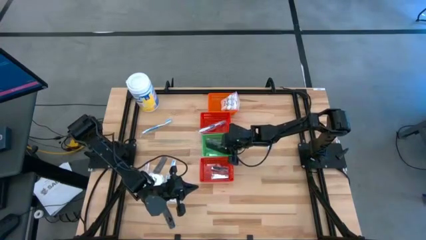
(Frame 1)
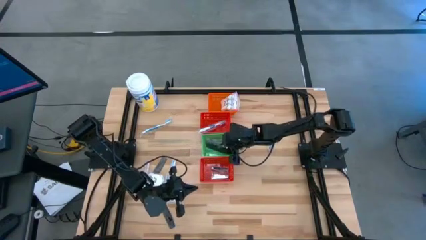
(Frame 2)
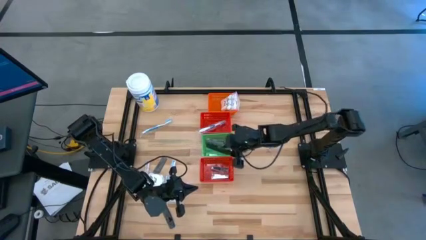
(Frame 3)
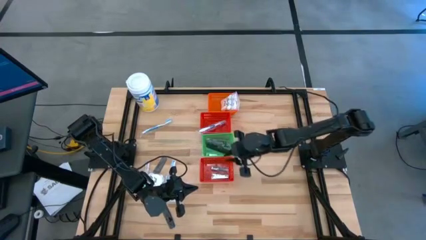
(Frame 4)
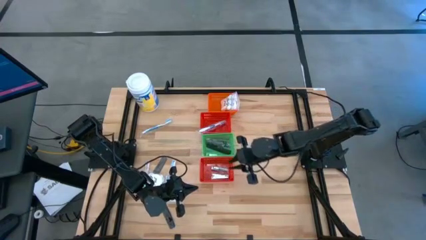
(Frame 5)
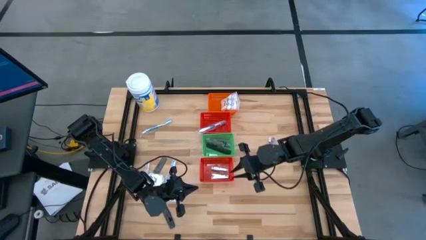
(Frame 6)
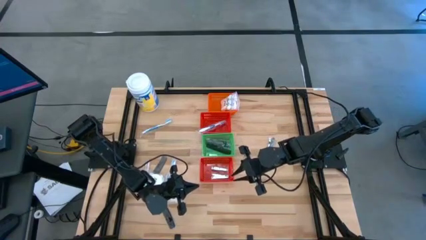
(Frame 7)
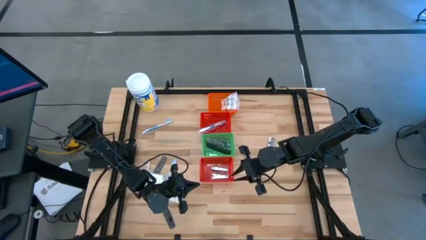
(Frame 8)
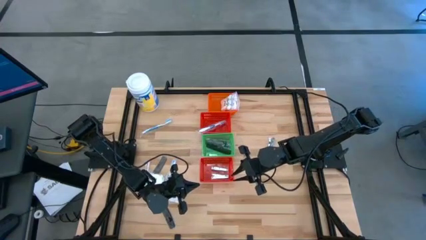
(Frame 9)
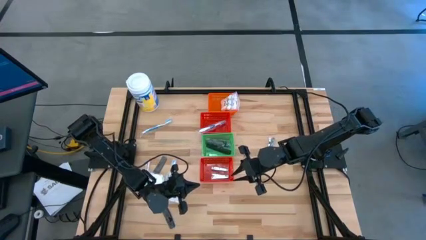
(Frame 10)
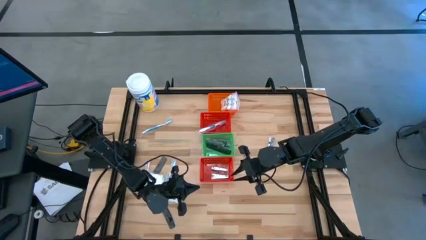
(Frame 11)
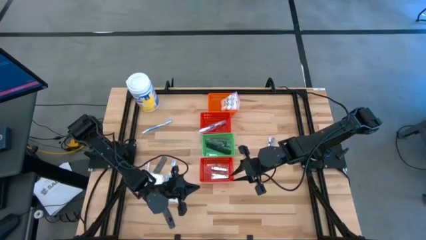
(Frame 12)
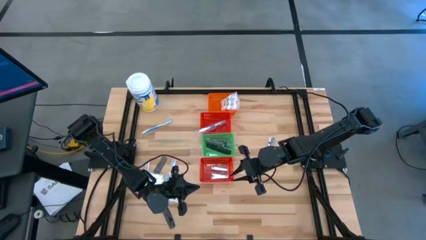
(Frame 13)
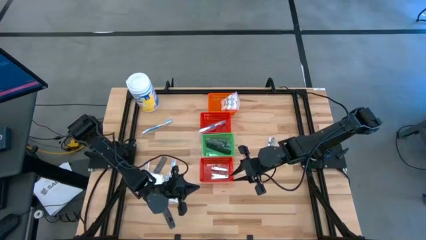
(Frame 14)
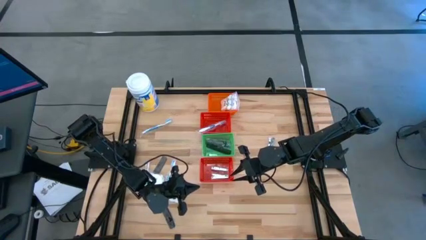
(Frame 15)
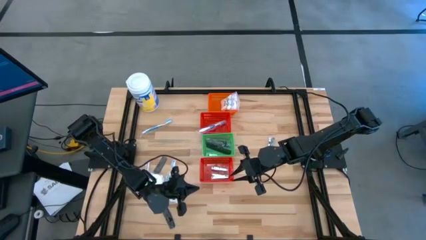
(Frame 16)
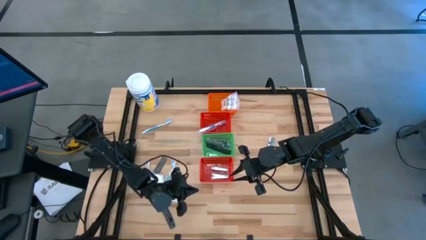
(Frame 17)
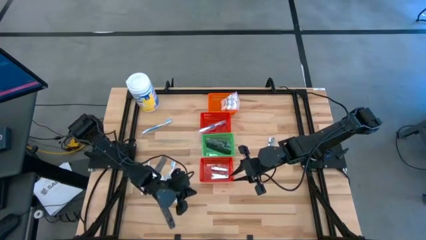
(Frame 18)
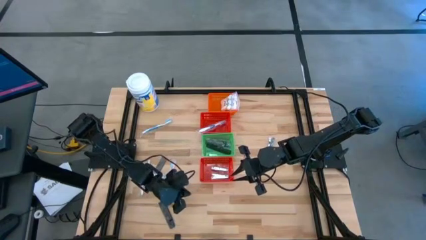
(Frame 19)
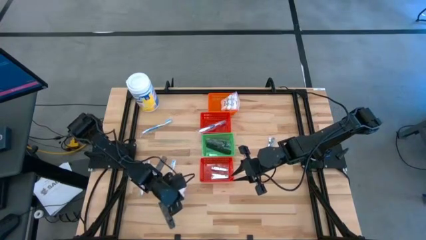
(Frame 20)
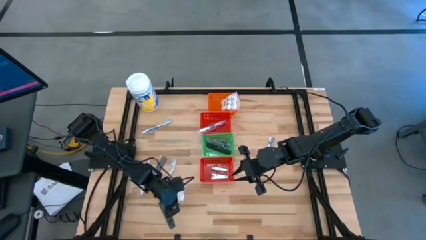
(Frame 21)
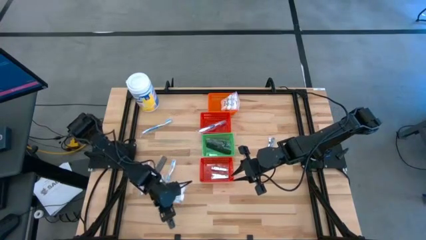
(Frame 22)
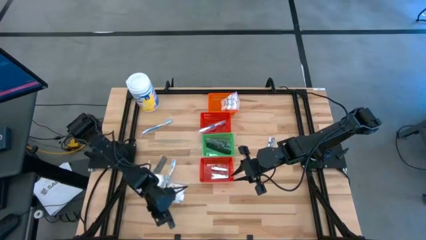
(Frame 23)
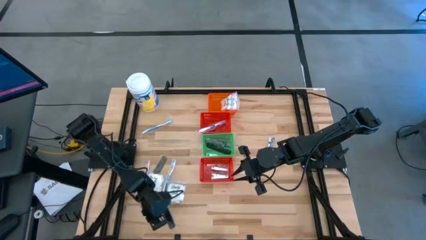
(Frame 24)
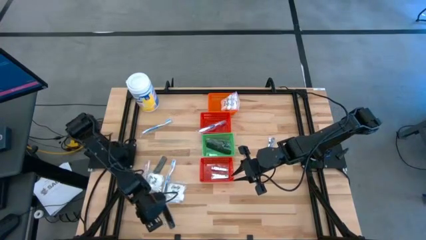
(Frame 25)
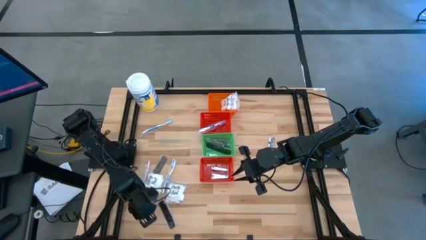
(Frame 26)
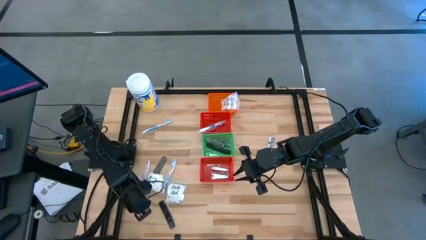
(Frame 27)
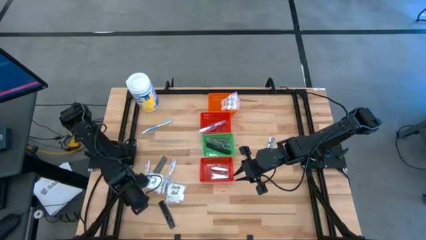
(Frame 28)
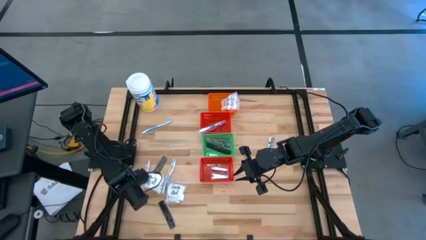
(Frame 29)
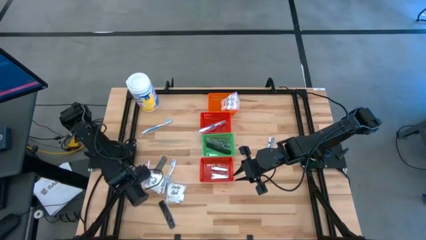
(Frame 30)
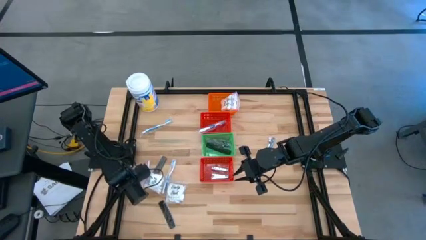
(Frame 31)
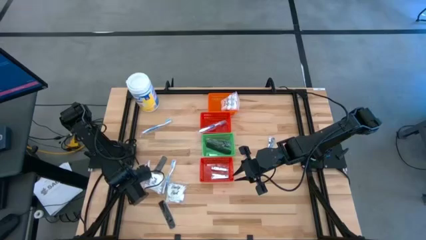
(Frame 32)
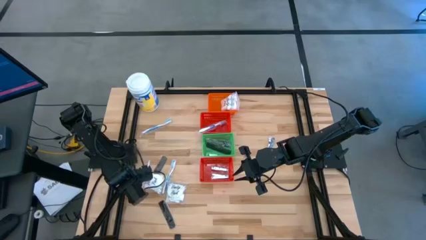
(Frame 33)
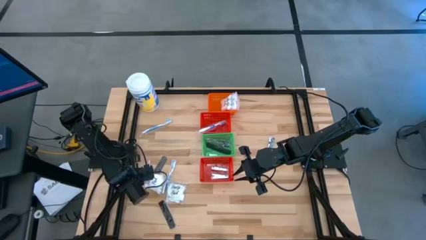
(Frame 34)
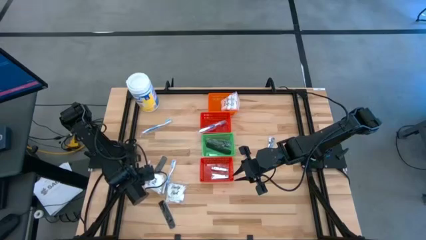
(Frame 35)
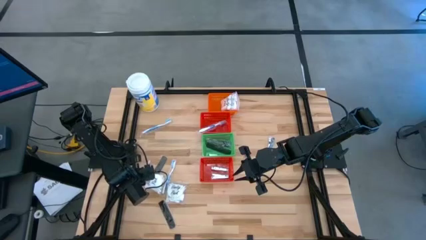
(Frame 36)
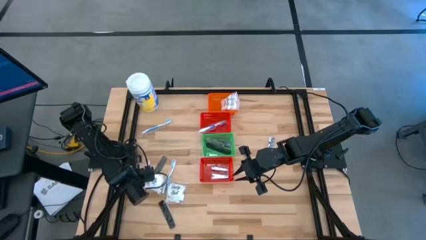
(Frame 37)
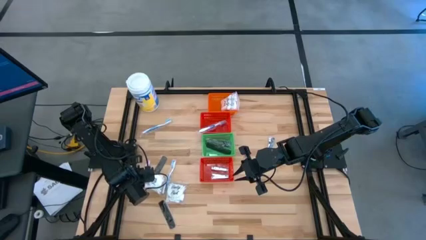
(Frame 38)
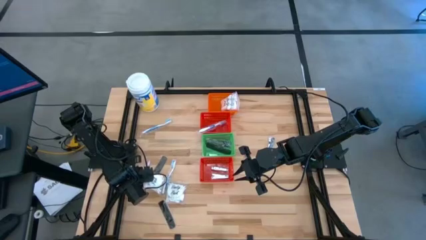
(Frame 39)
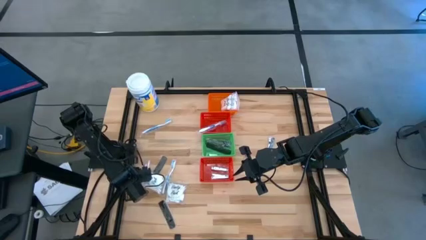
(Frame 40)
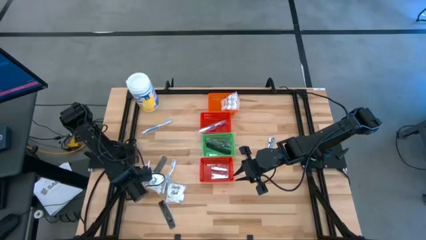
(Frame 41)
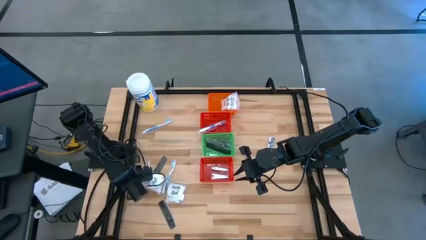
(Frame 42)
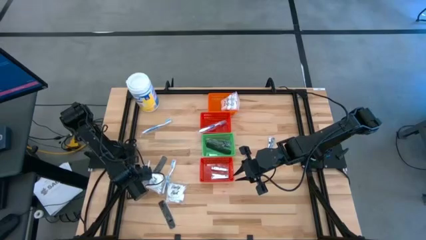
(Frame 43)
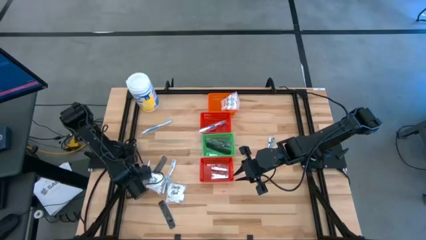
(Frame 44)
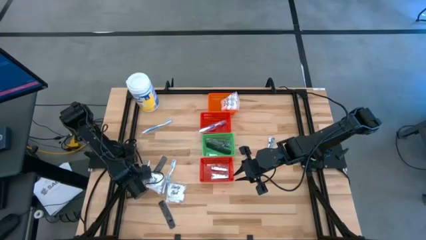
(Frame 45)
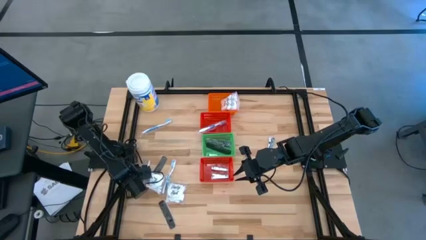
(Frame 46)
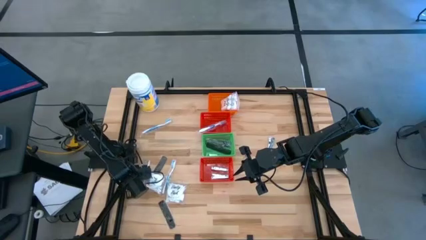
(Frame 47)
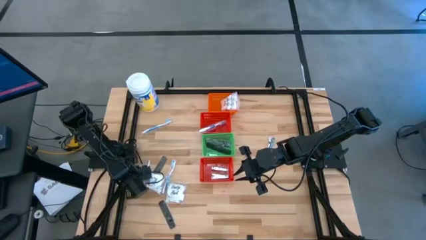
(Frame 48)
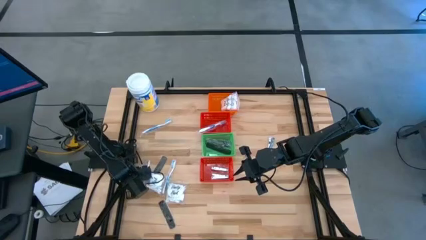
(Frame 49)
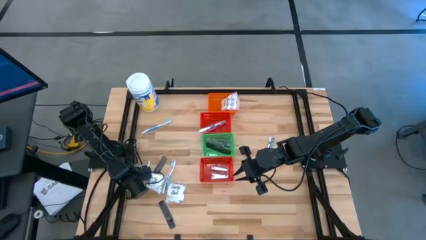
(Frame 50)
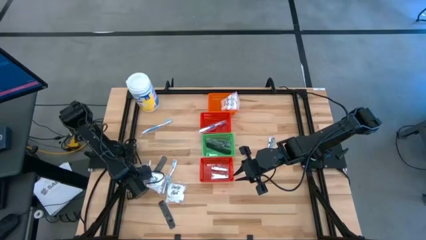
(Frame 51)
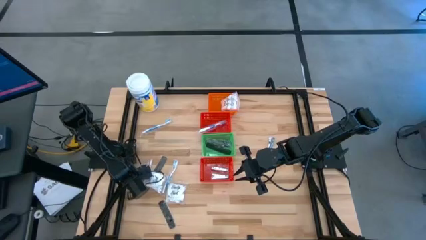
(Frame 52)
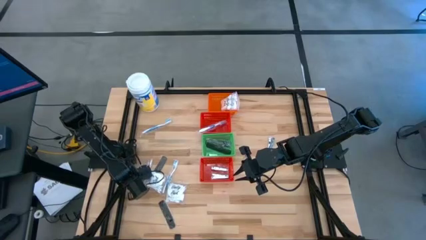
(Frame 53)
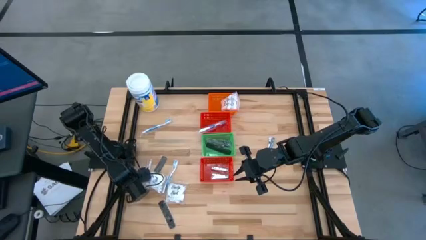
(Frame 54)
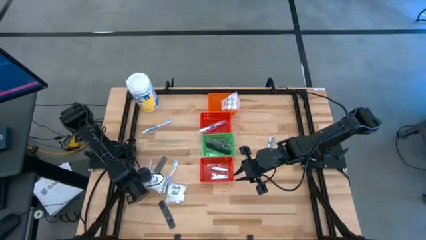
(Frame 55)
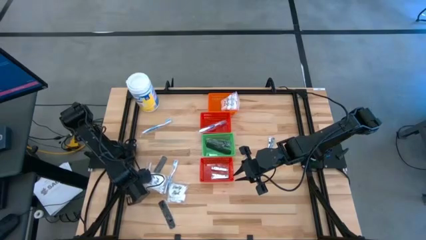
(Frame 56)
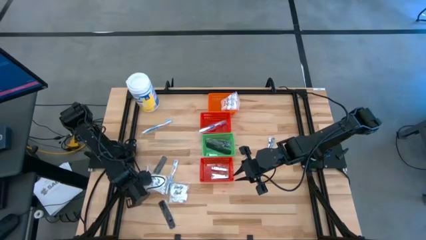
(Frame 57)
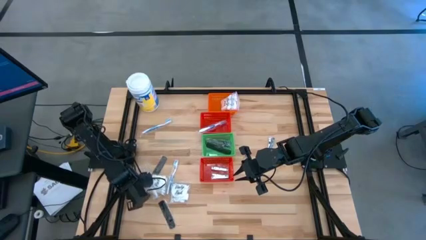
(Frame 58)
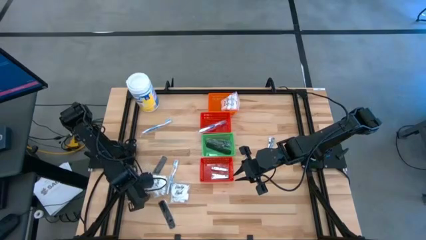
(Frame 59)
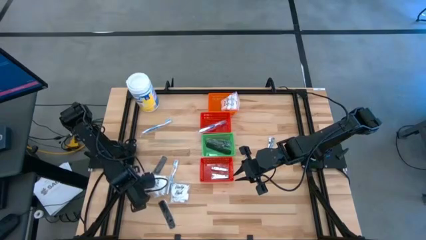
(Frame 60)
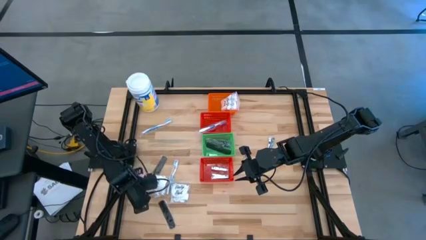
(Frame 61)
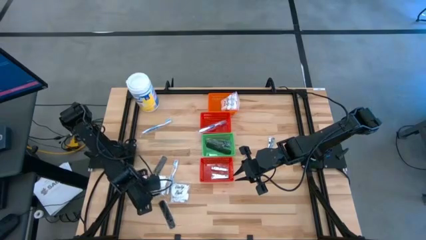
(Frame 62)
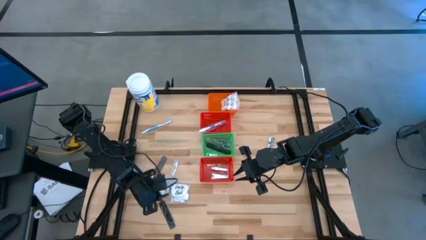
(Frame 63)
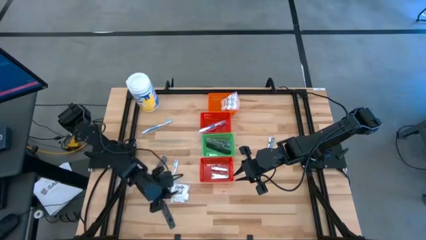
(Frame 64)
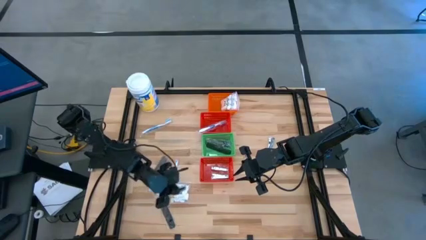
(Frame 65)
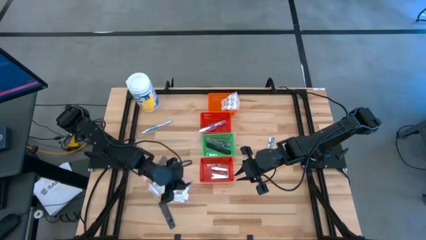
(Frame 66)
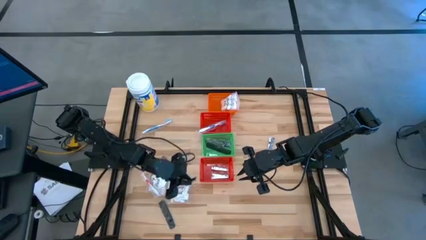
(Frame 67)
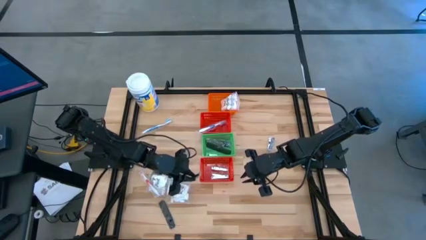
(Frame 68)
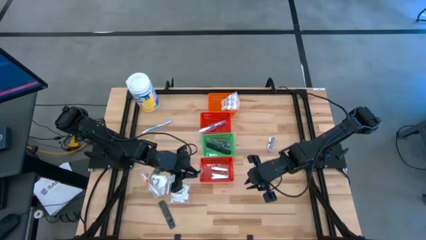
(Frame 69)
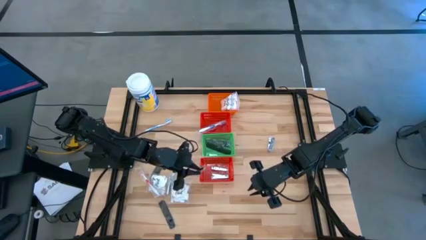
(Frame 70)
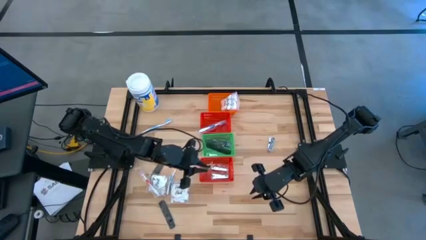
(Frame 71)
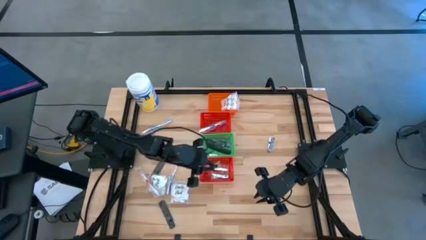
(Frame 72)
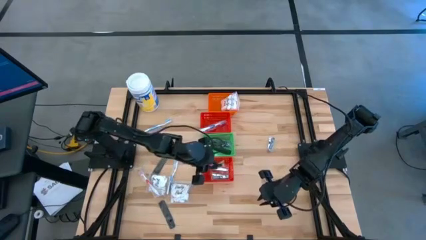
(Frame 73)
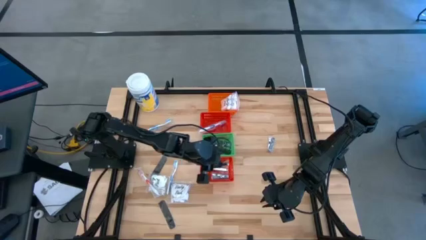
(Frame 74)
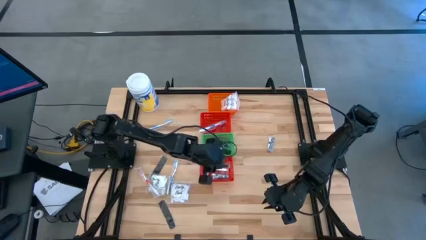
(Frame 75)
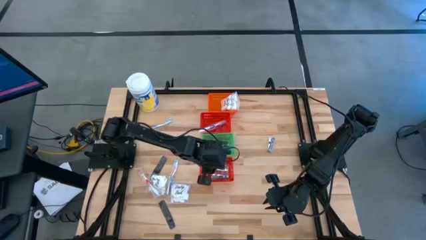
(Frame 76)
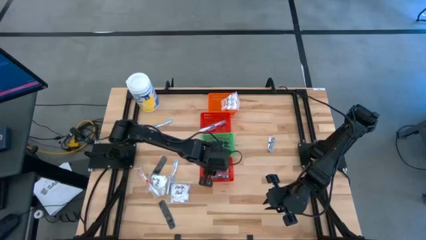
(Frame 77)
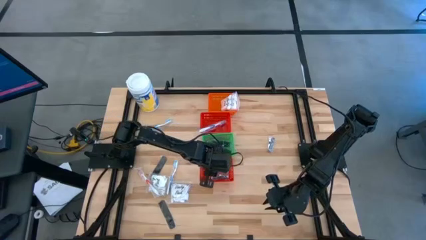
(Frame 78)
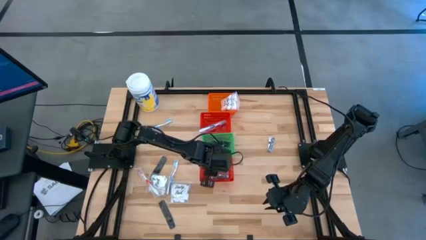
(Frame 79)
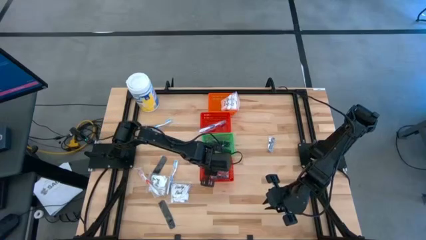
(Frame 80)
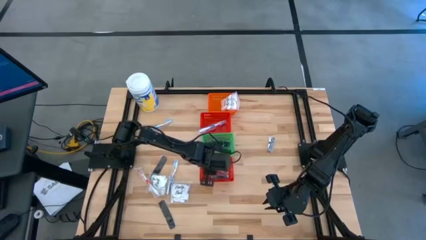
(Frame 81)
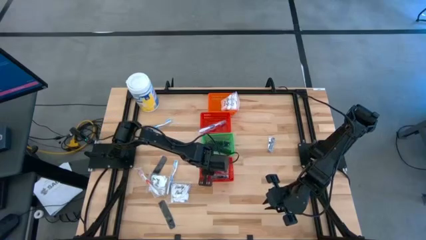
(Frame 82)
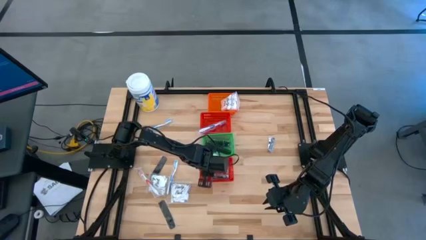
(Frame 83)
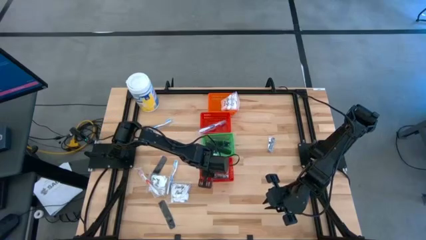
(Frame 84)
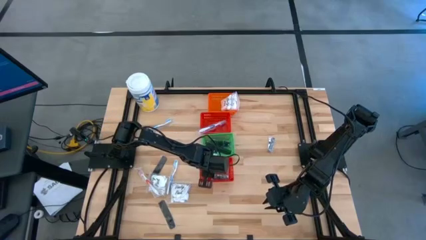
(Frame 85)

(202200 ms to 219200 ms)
Task: Pick & Place Travel size toiletries
Put the silver nail clipper into the bottom red basket
